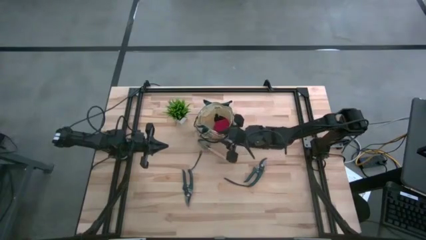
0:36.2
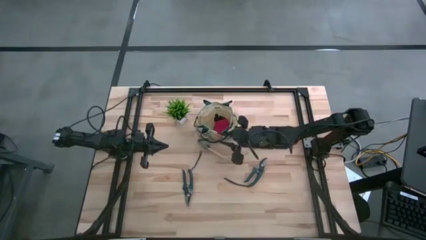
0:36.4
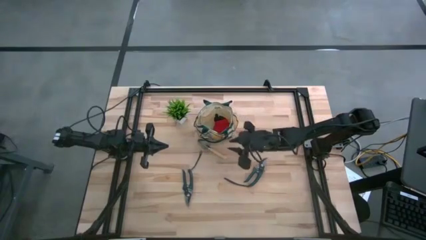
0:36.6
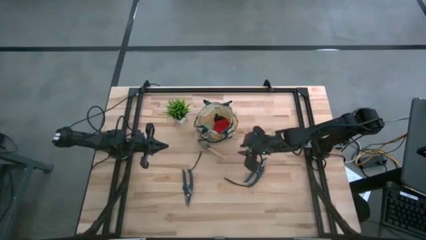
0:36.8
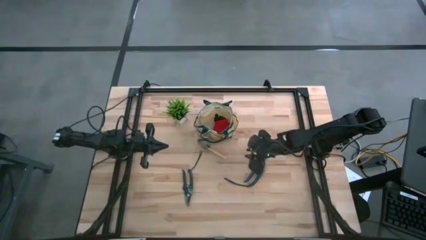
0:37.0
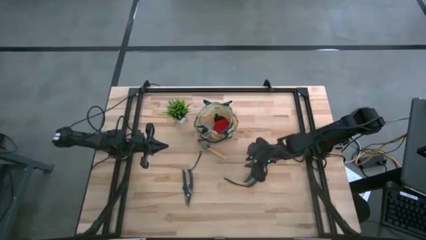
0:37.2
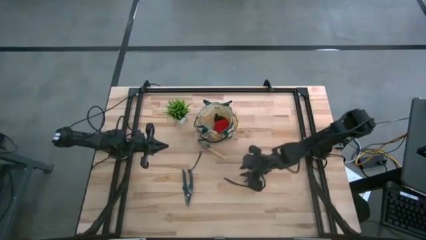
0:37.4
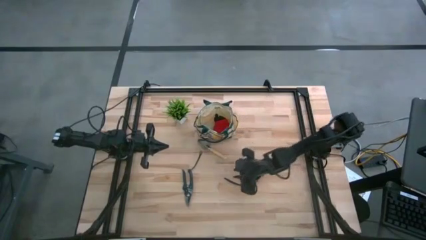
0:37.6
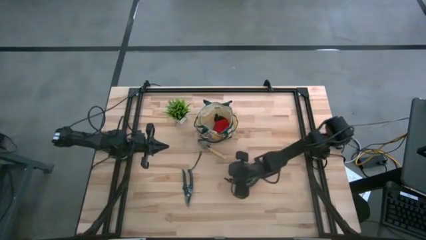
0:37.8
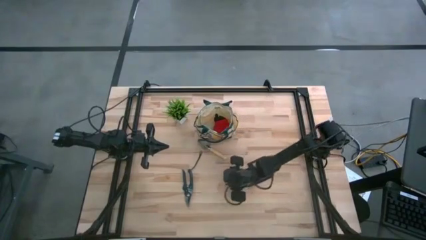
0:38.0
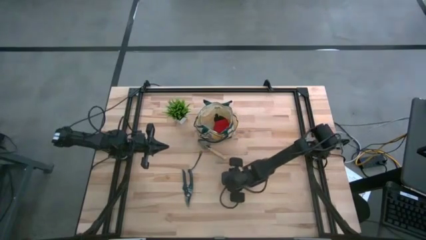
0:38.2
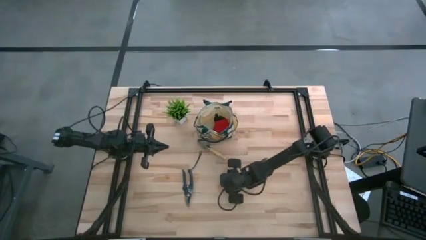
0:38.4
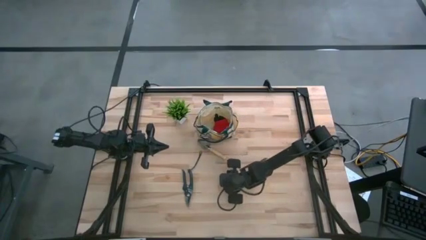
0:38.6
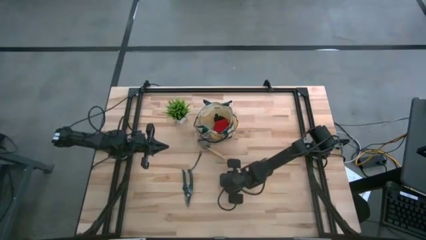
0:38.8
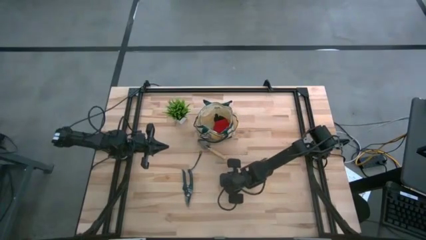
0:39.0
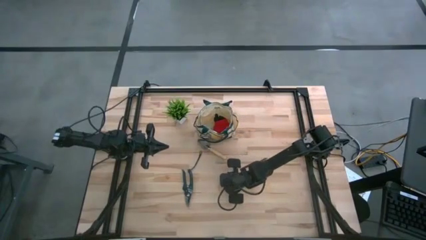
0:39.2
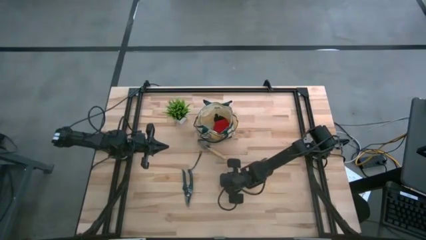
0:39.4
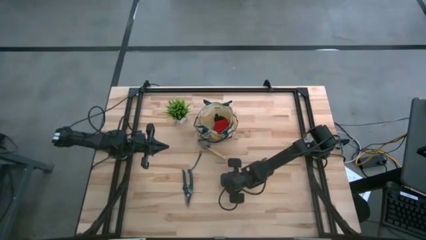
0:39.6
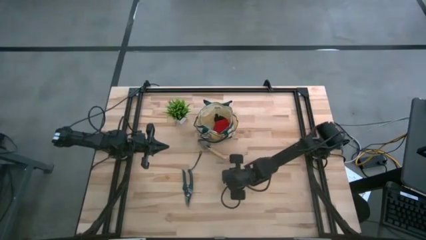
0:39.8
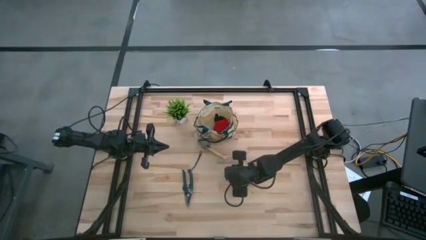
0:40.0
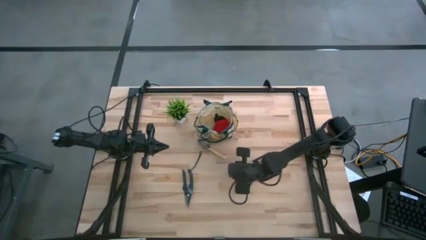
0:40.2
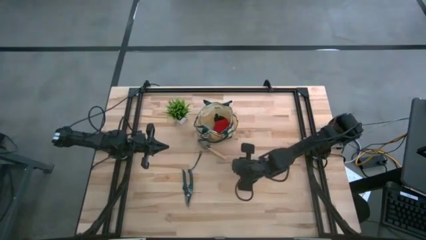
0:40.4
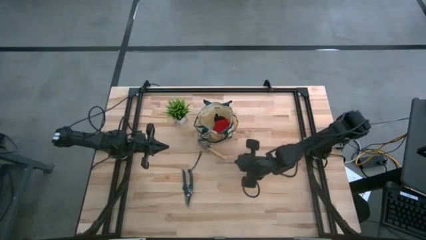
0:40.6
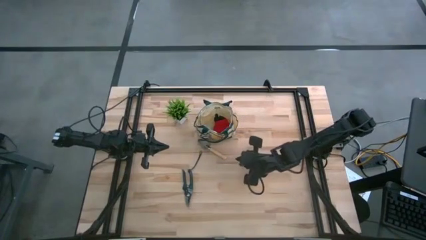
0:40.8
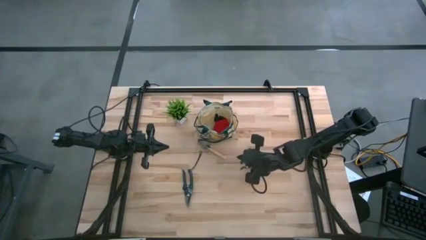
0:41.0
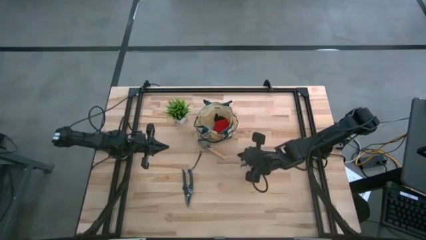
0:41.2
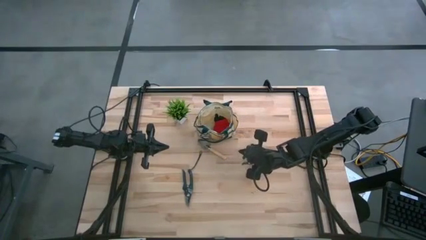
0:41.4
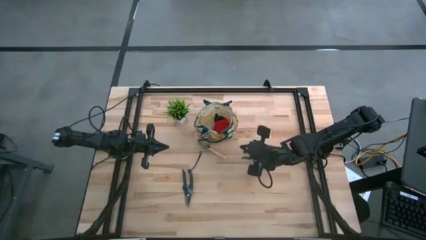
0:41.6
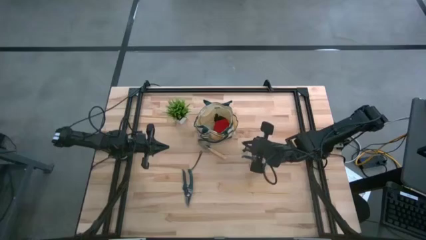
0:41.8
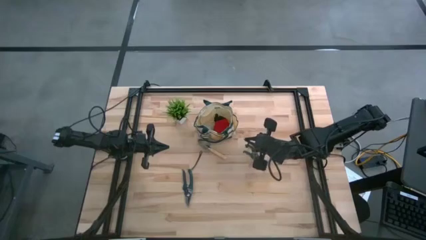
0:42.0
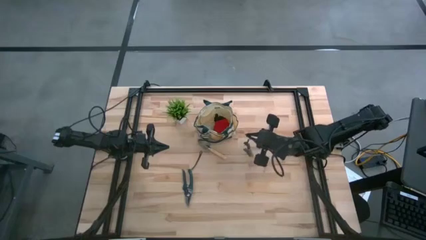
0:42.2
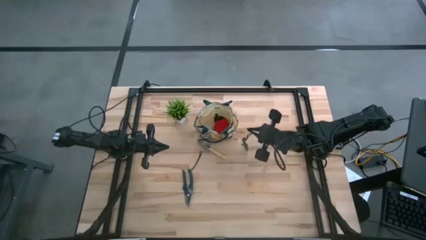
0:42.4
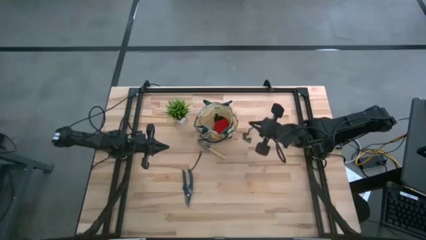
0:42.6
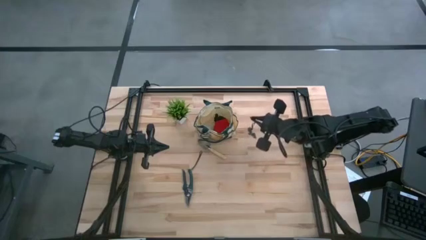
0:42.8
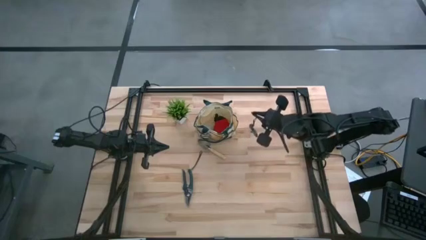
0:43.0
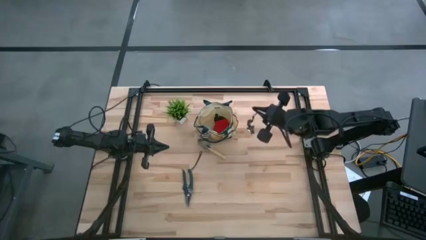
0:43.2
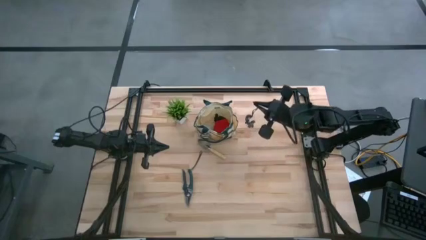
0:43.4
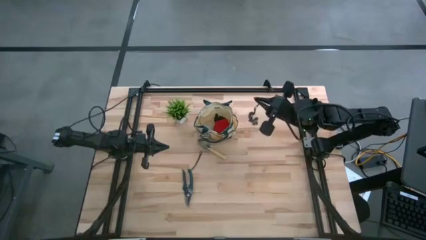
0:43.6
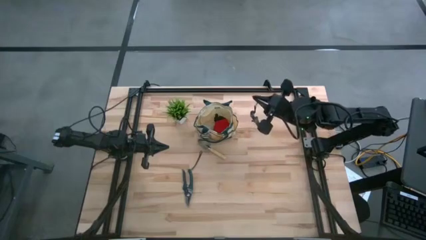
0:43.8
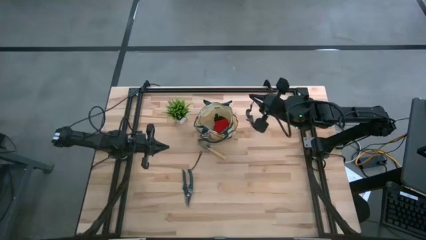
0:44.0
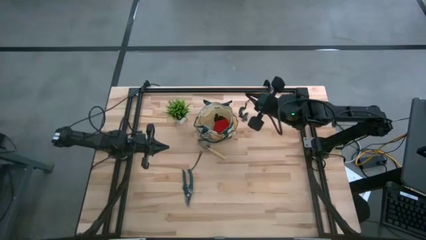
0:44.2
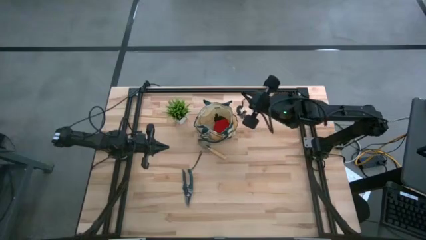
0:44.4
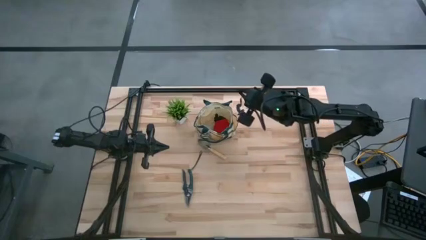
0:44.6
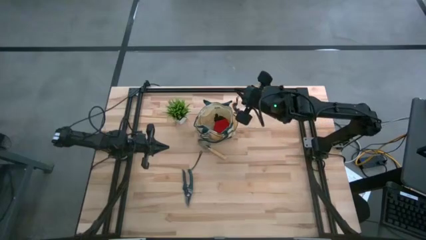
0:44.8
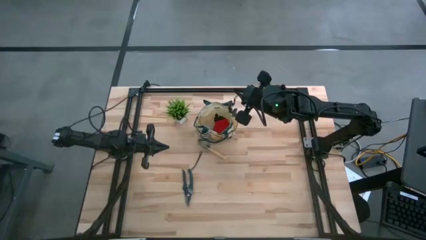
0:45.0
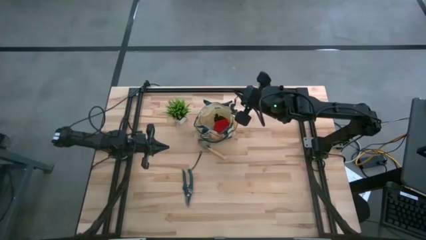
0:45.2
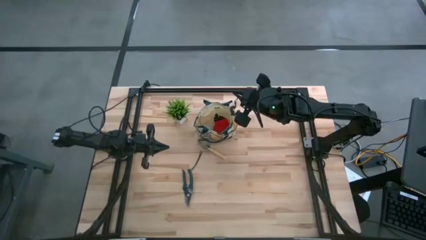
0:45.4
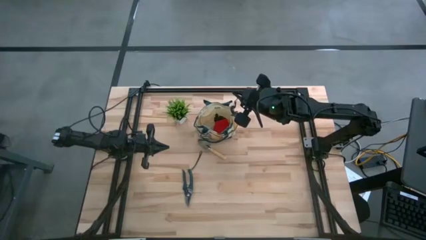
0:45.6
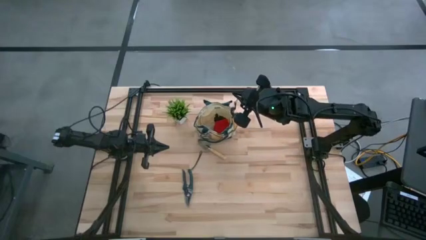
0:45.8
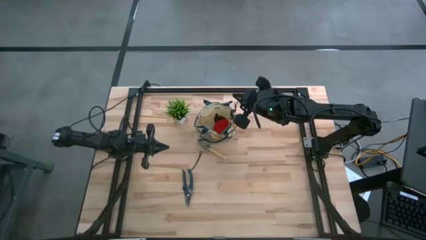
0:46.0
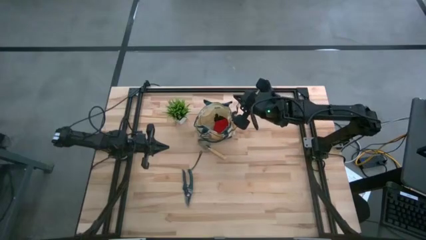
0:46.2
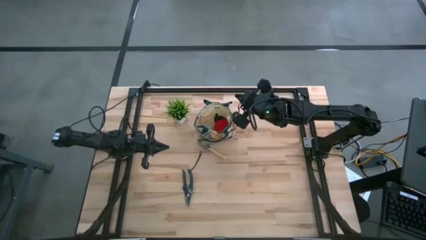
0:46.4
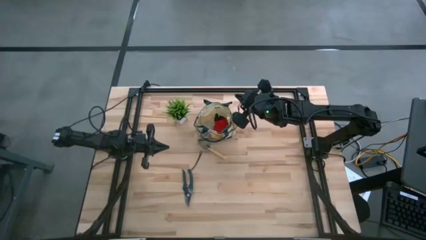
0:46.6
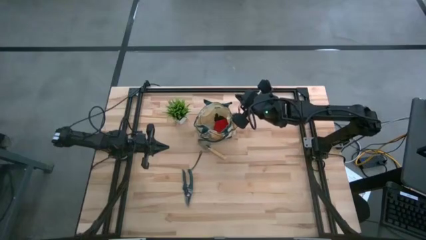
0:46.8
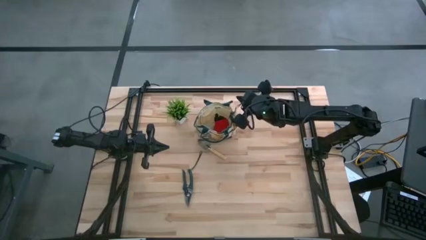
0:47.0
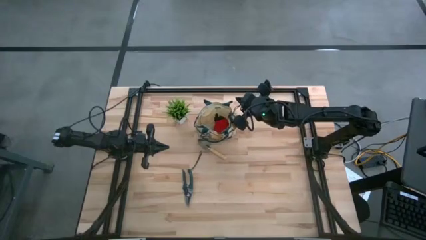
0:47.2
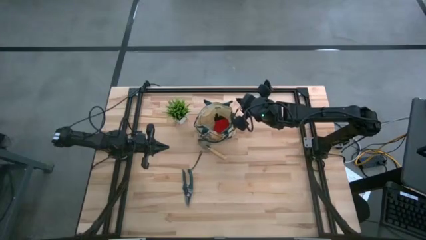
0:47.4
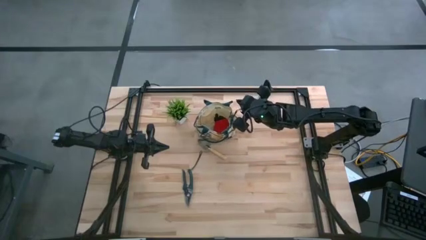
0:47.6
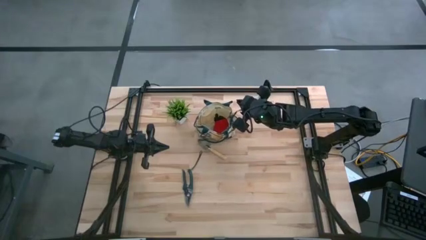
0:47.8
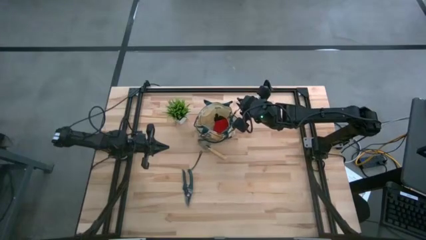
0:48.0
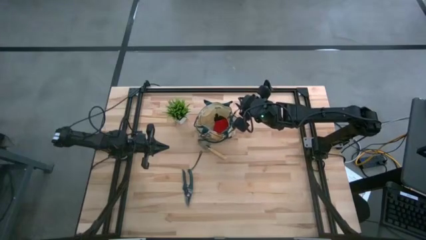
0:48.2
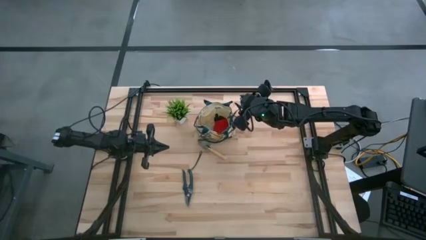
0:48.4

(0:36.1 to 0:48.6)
Task: Pick & Place Garden tools in Gardening bag
Put the top green shear scissors into the white gardening bag

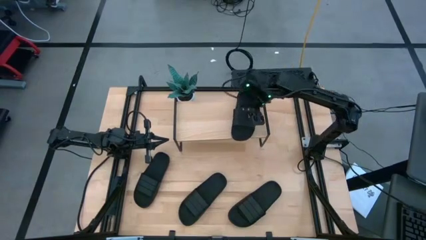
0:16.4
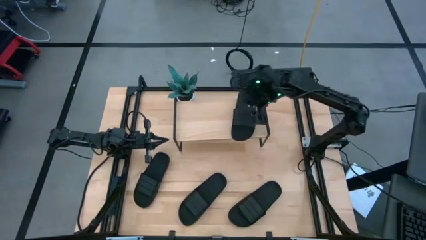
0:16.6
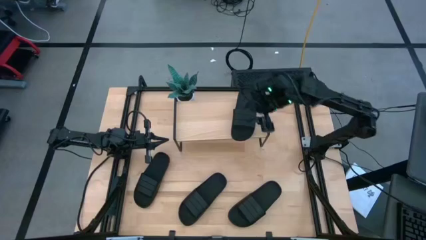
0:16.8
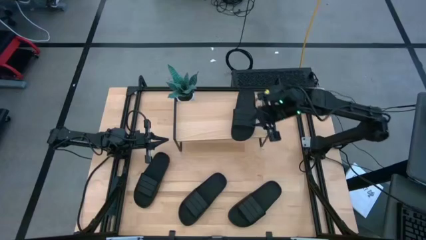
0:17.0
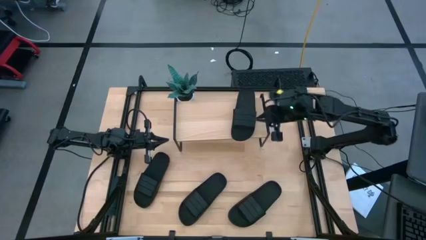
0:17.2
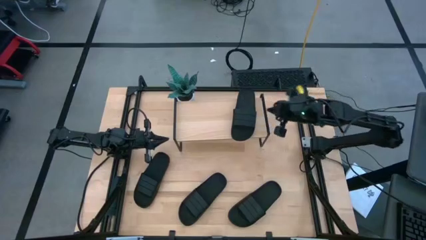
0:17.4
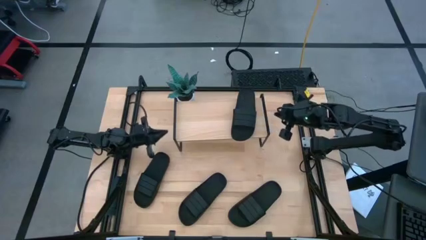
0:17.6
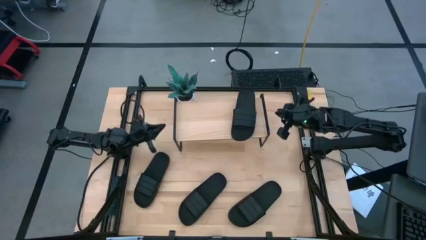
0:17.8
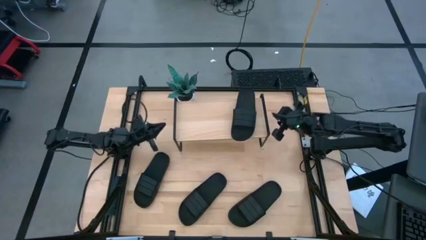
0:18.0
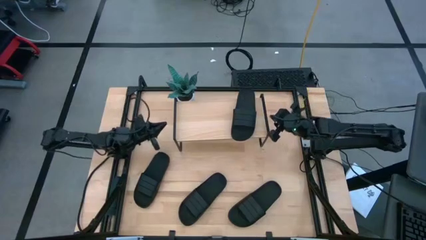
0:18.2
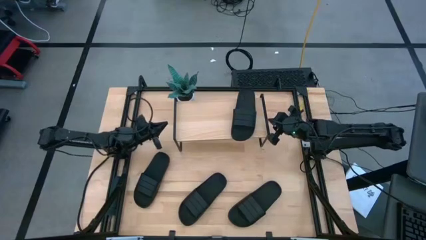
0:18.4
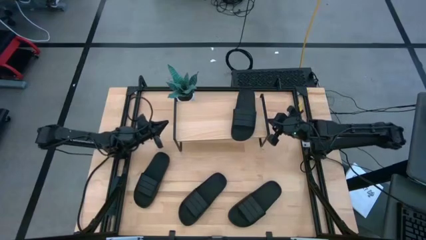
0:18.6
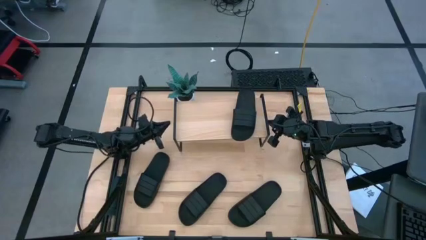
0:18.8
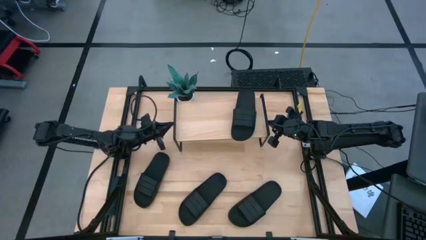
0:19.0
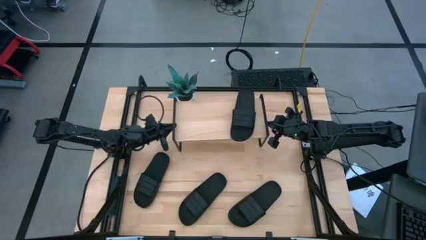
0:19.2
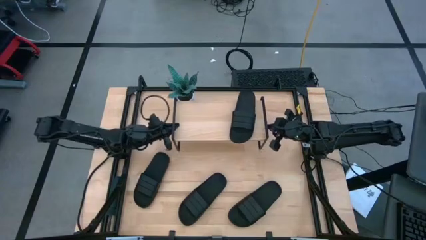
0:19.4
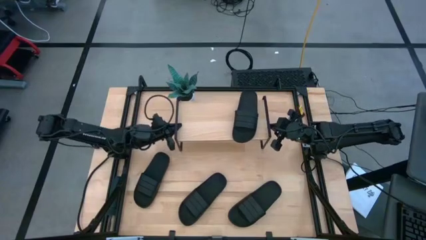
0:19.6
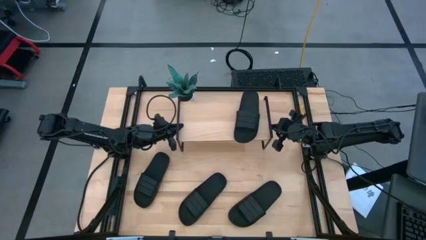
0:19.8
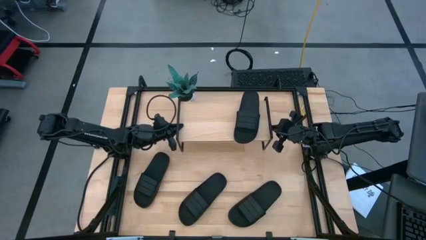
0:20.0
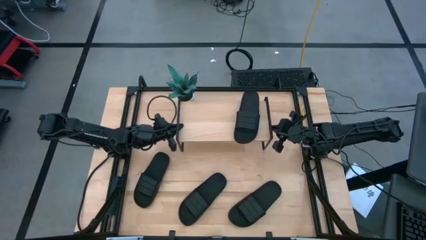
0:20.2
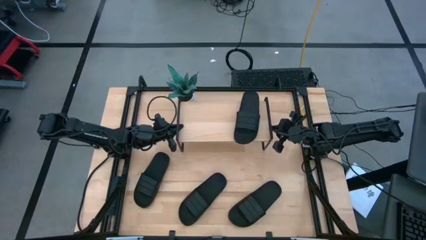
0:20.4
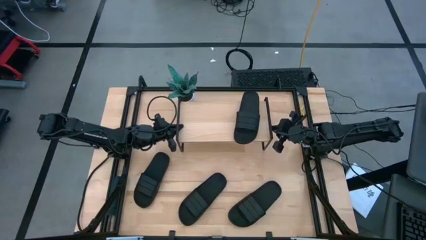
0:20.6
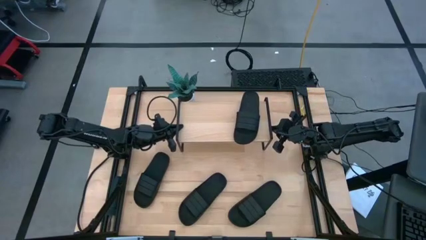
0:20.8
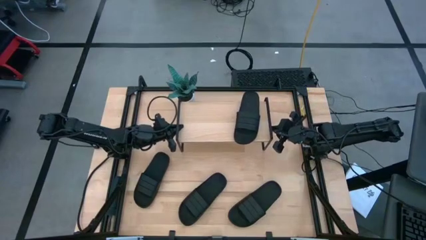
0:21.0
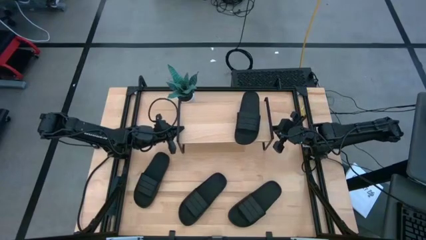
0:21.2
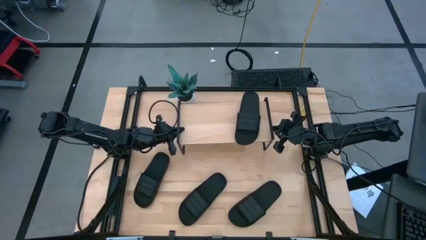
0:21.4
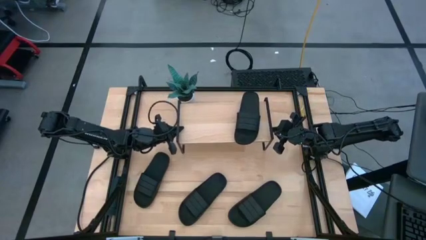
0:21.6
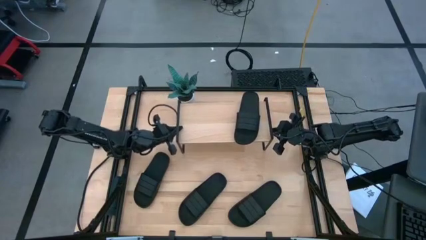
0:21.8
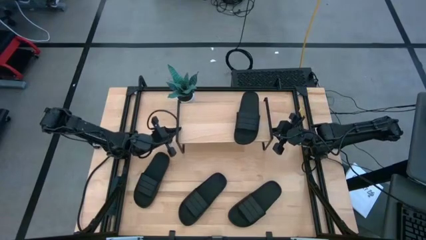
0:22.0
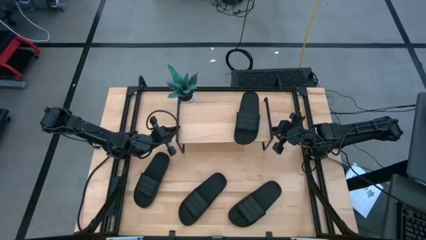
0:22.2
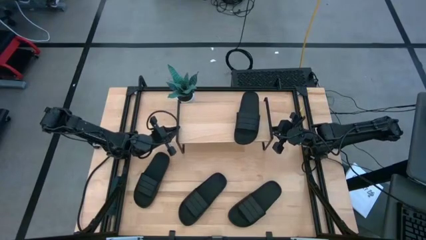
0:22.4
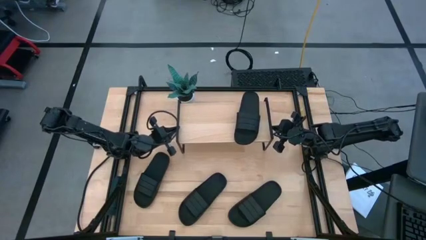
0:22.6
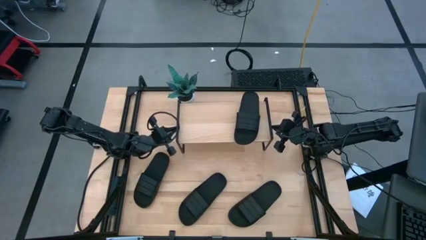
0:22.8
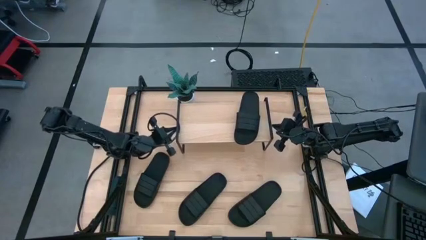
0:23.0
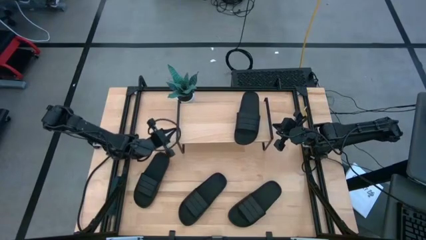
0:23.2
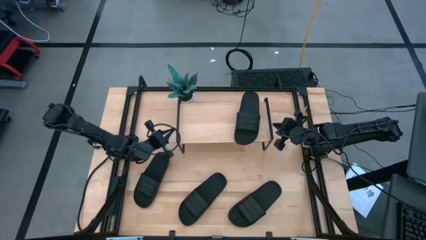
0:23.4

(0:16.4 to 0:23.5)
Task: Pick and place slides into the shelf
Adjust the shelf on the table
